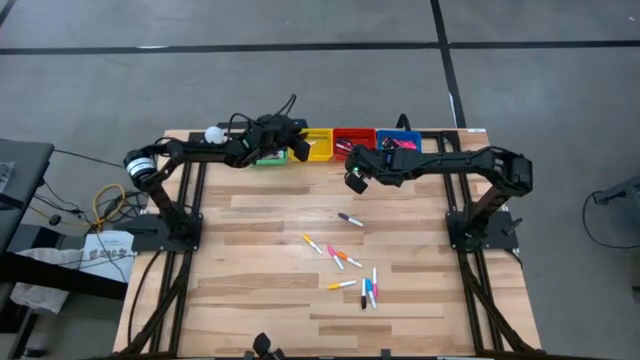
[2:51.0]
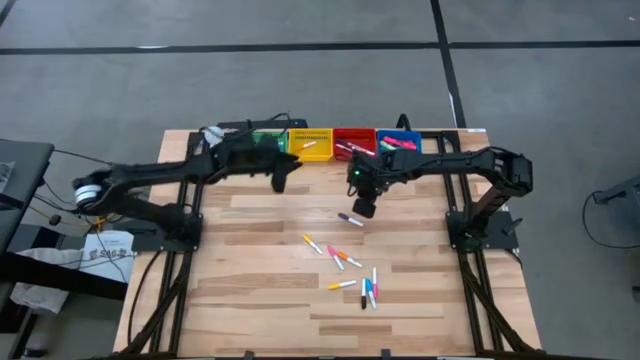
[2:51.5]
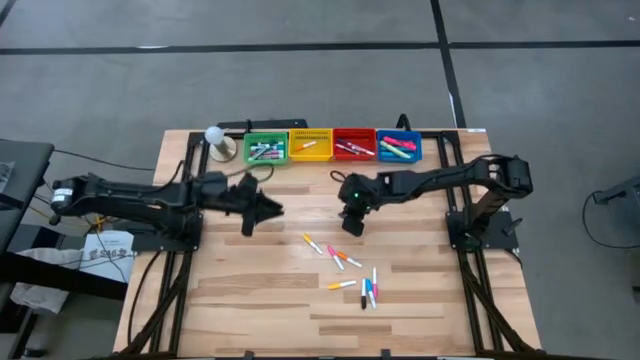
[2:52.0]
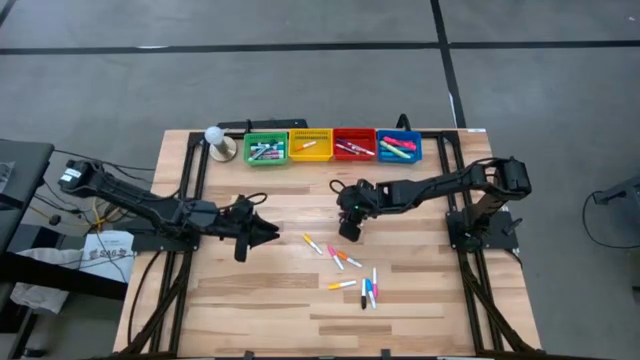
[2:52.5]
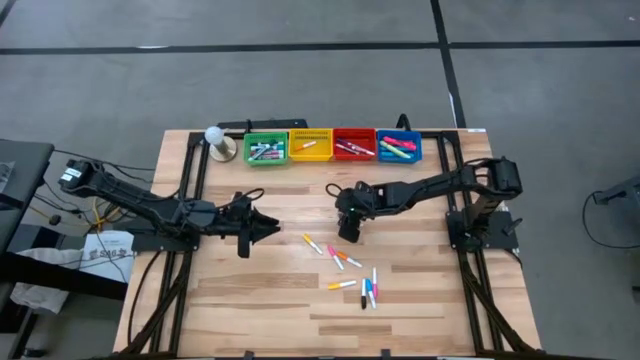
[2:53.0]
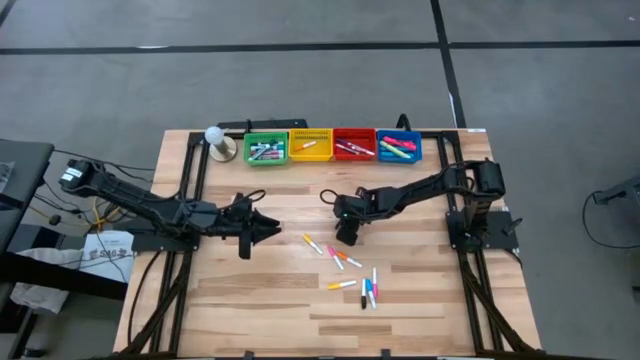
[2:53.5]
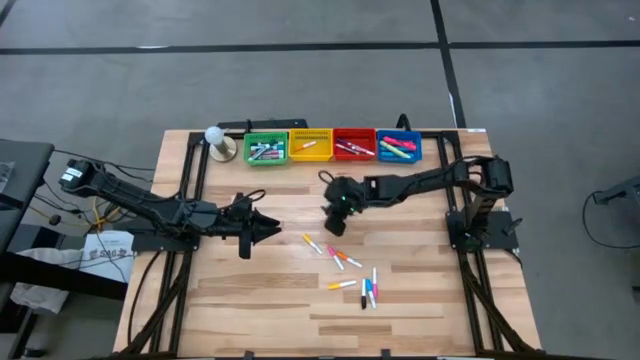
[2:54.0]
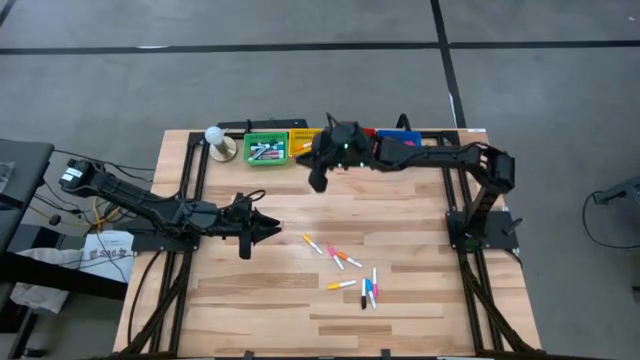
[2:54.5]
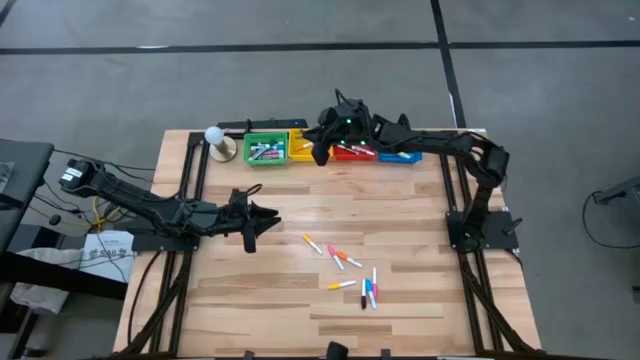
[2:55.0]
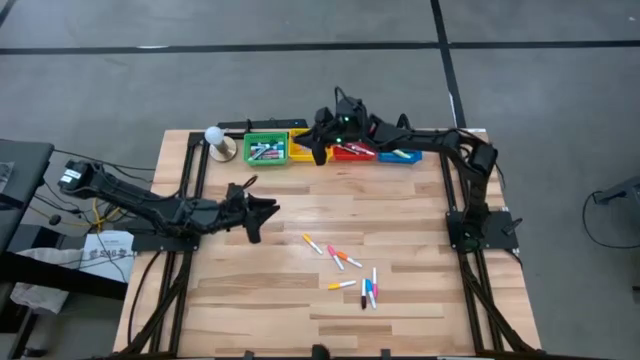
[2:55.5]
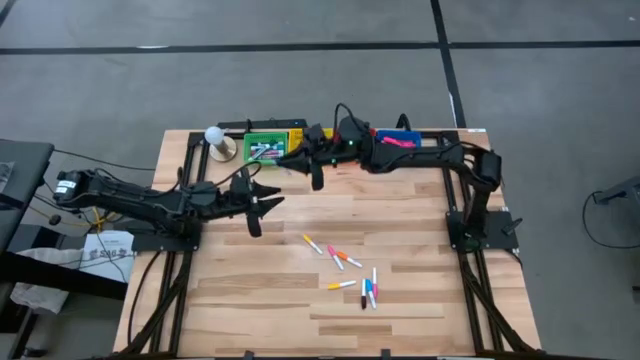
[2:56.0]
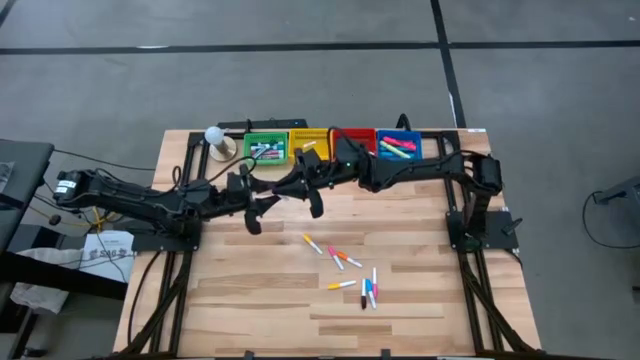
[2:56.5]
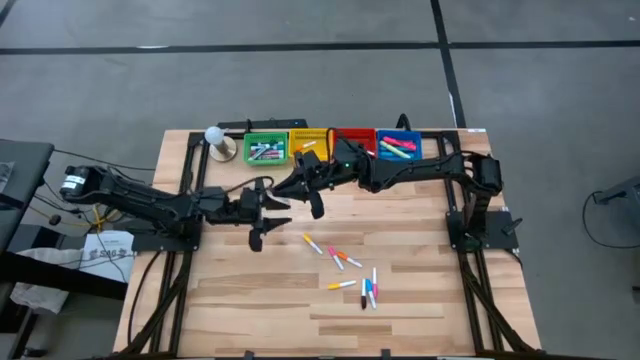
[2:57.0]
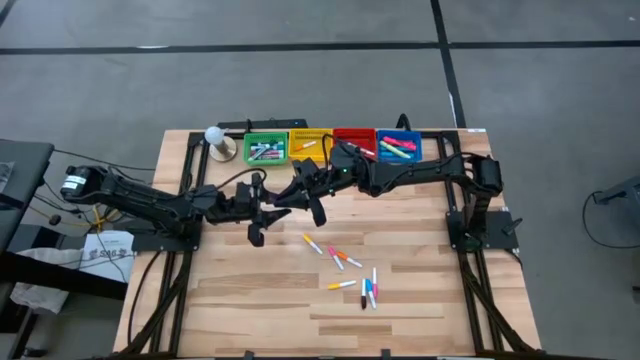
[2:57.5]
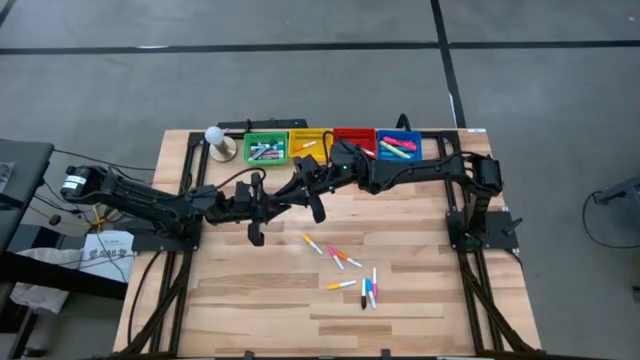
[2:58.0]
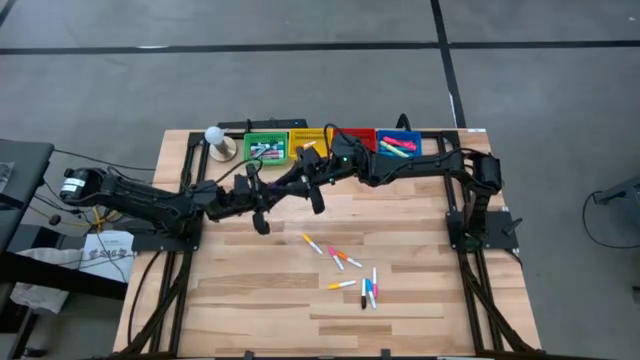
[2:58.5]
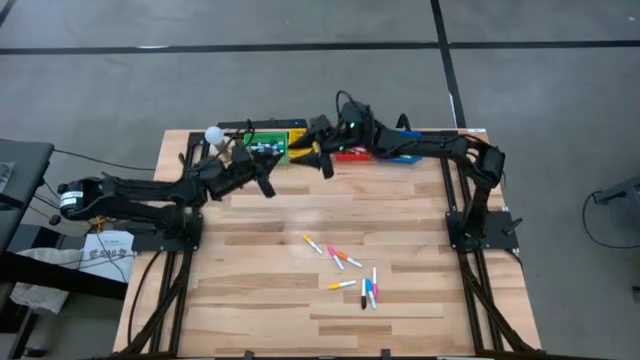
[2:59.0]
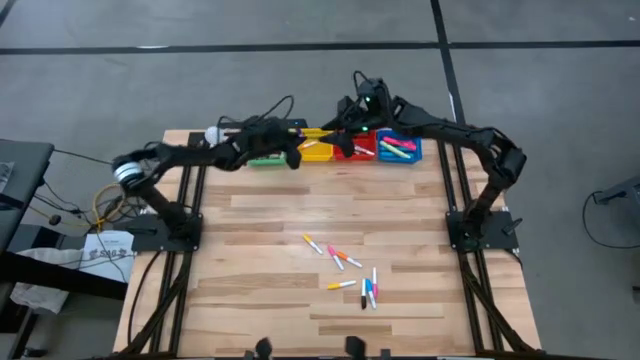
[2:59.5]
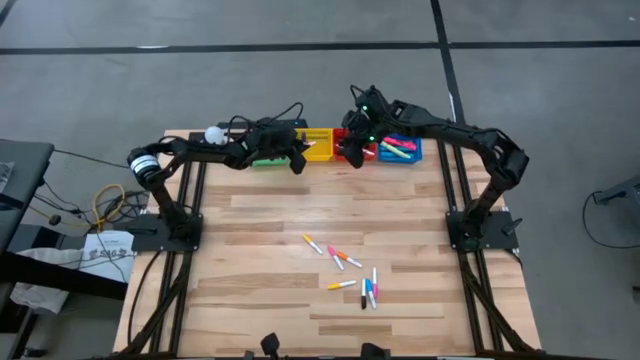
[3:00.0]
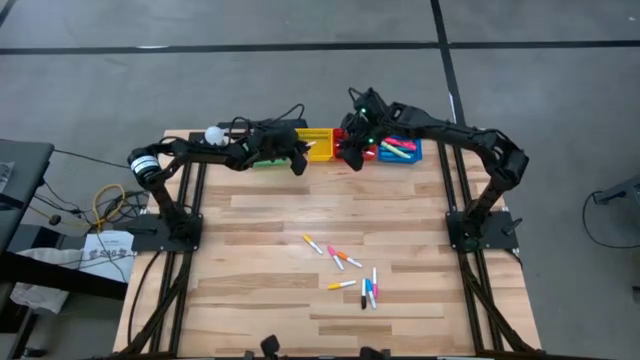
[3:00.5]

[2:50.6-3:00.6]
Task: Pick & Place Markers
Put the violet highlighter pen into the yellow basket

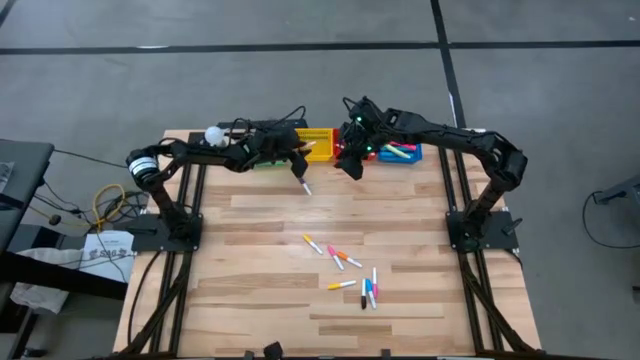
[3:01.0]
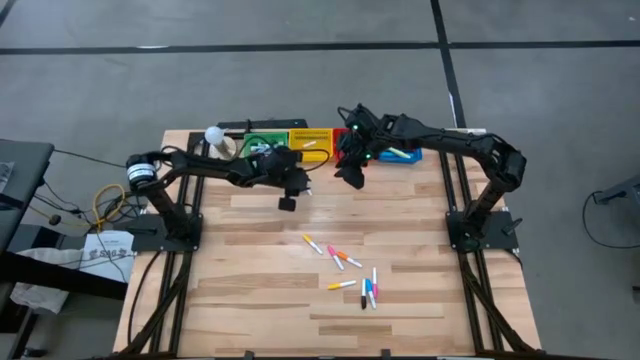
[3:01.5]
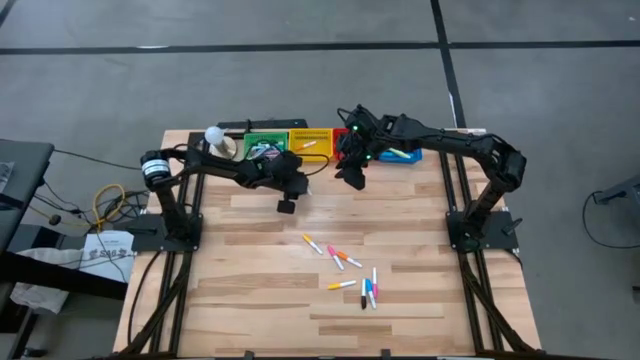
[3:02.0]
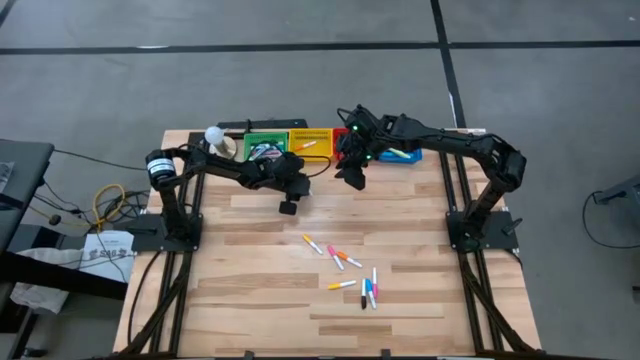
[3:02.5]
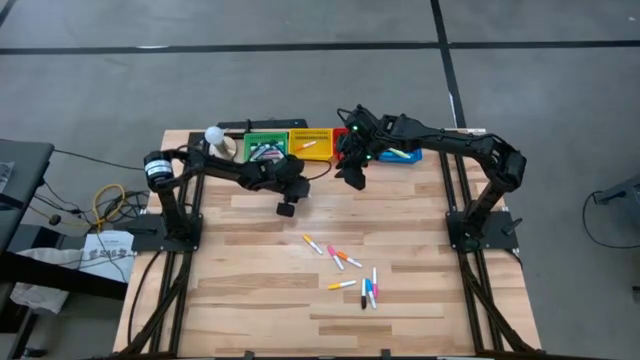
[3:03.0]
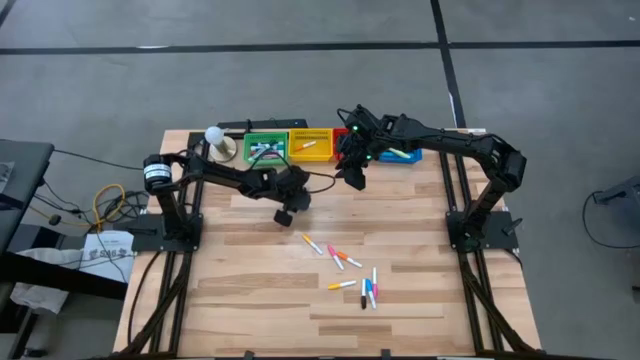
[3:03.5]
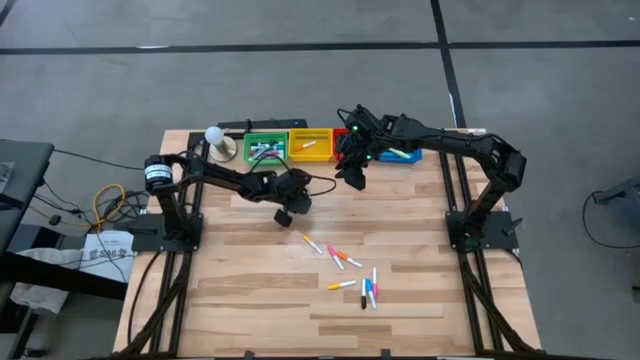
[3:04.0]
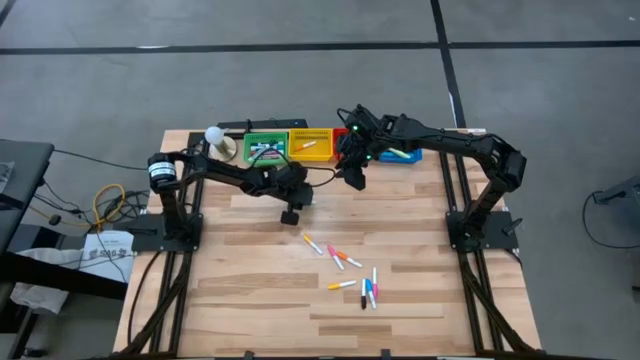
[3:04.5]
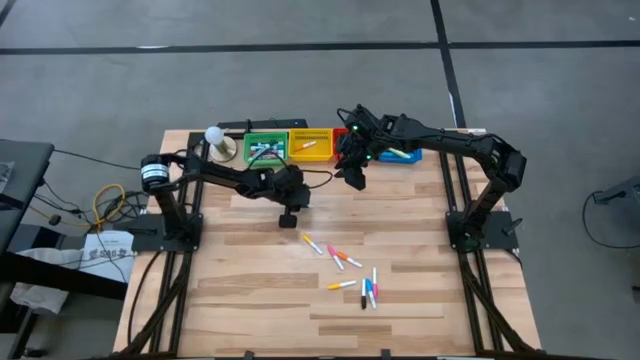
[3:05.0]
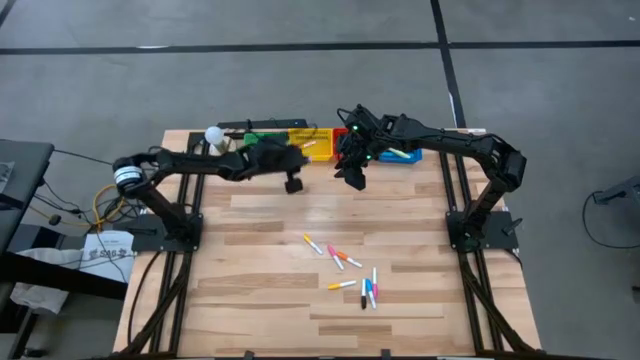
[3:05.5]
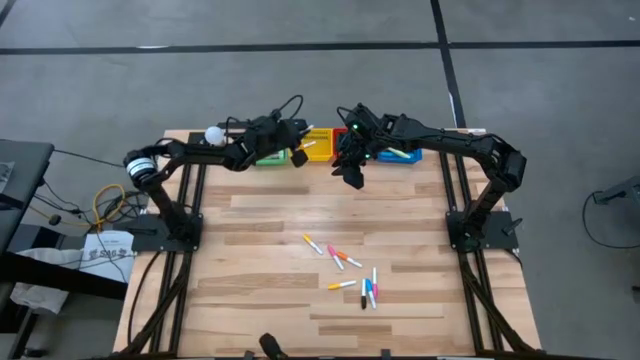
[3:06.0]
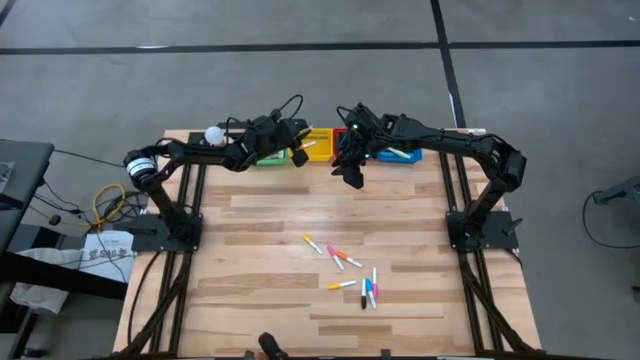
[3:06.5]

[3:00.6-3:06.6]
Put the violet highlighter pen into the yellow basket

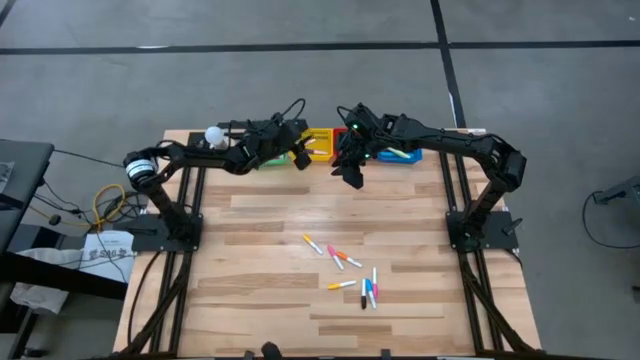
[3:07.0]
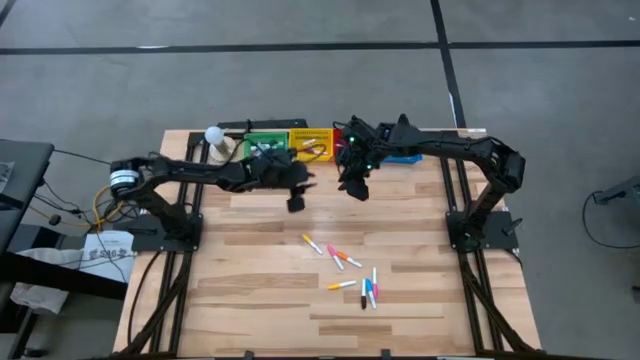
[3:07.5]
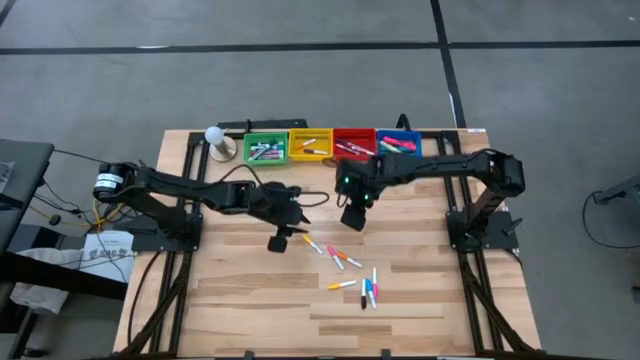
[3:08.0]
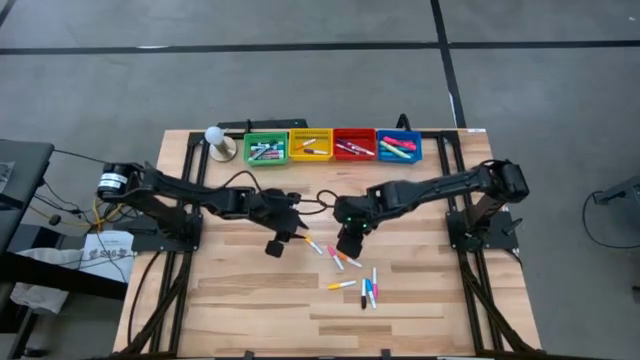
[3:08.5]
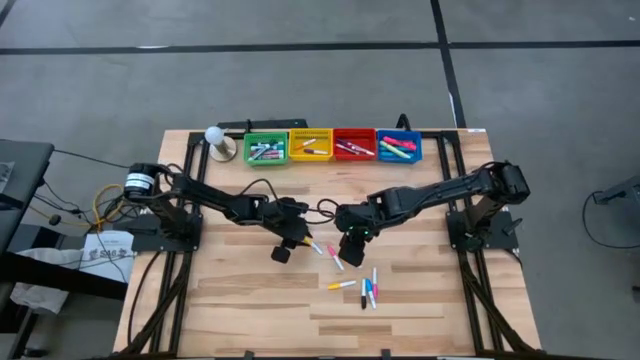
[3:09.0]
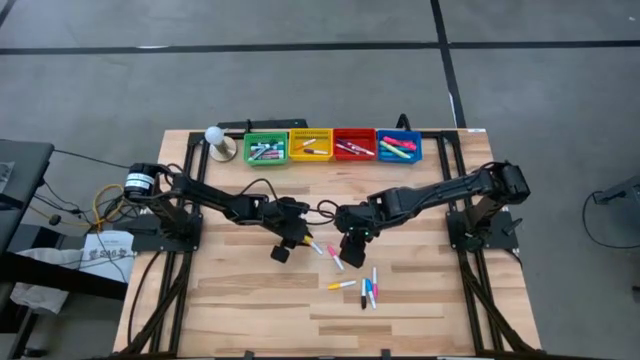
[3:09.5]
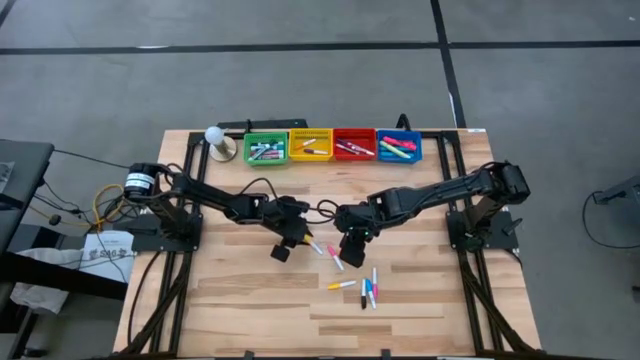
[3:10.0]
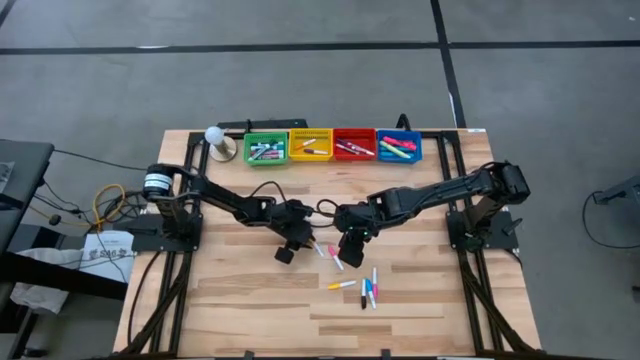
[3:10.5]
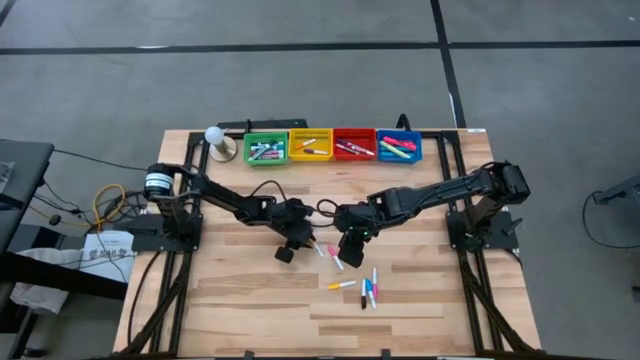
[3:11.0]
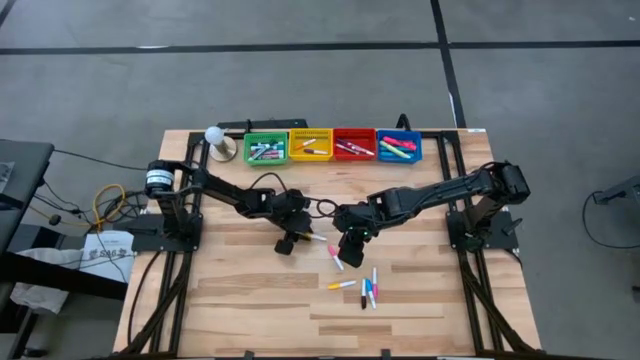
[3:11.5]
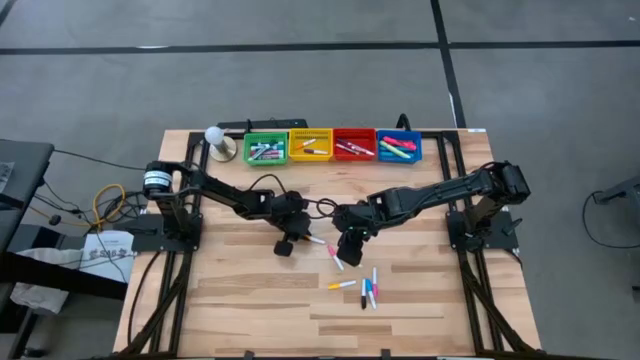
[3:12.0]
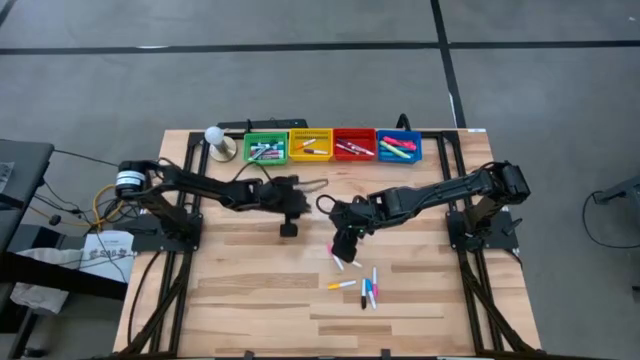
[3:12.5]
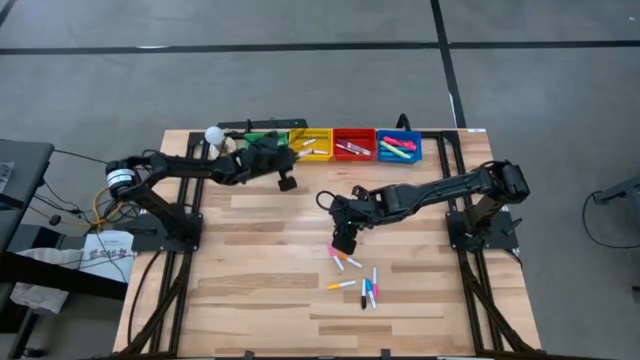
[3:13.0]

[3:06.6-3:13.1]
Put the yellow highlighter pen into the yellow basket
